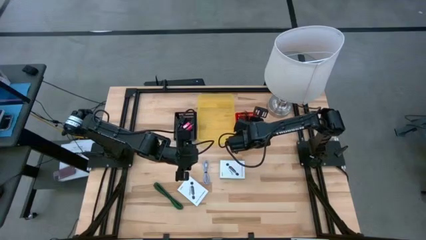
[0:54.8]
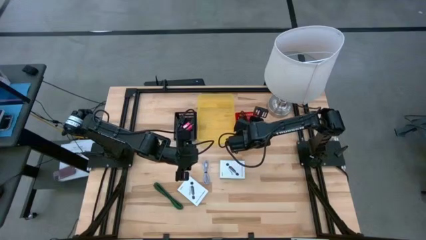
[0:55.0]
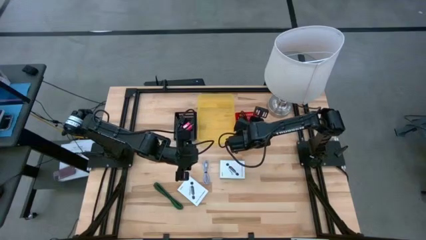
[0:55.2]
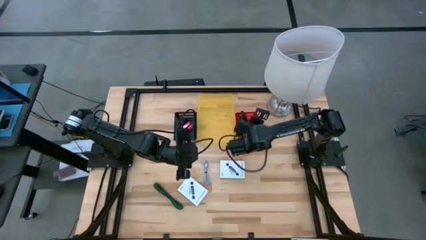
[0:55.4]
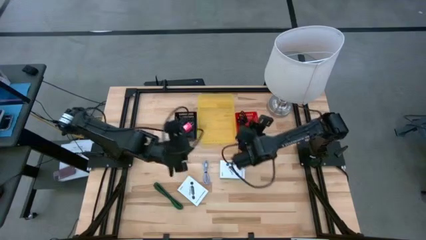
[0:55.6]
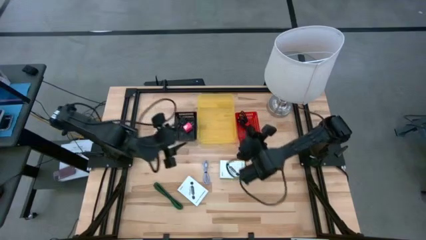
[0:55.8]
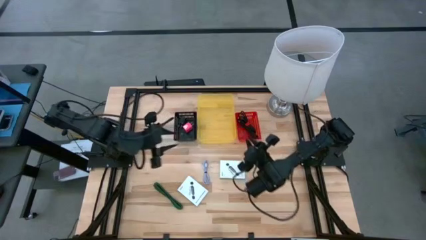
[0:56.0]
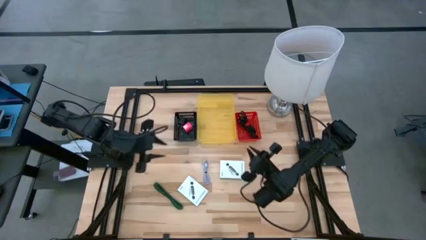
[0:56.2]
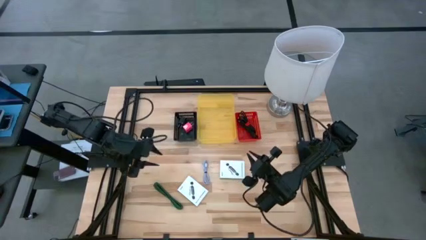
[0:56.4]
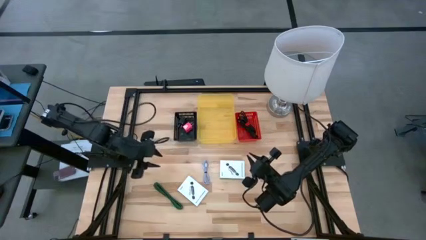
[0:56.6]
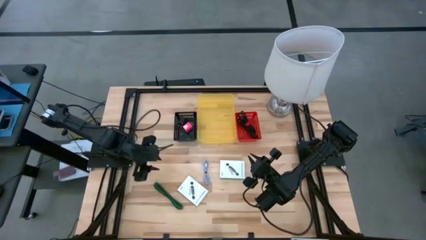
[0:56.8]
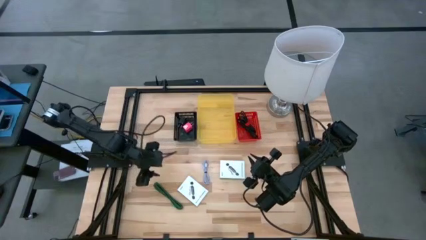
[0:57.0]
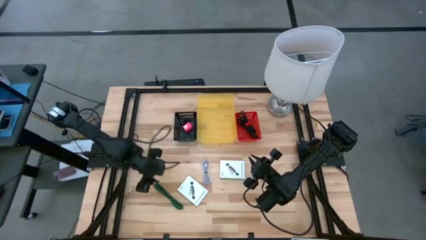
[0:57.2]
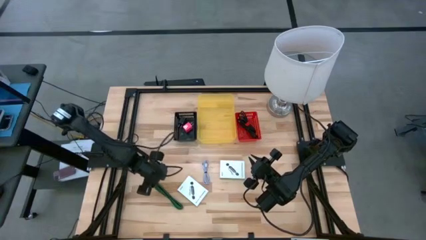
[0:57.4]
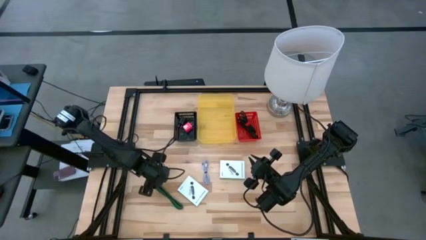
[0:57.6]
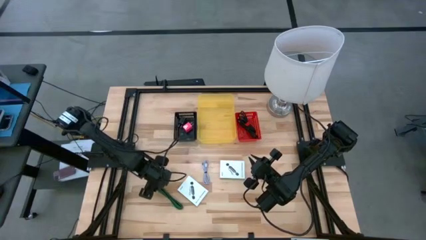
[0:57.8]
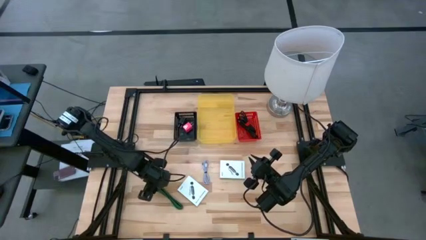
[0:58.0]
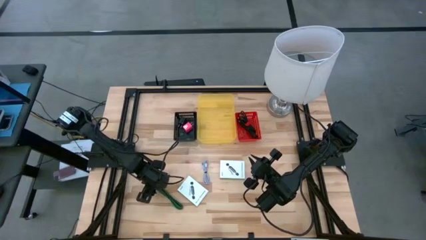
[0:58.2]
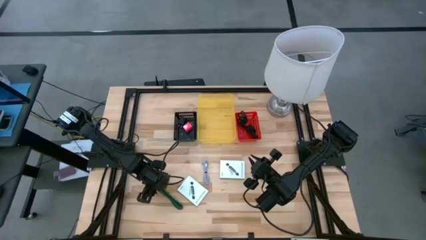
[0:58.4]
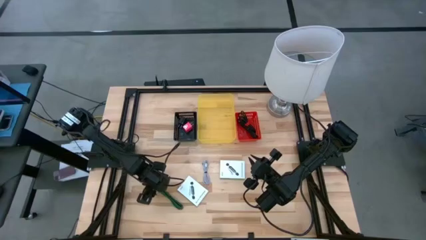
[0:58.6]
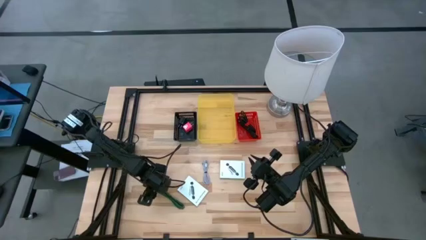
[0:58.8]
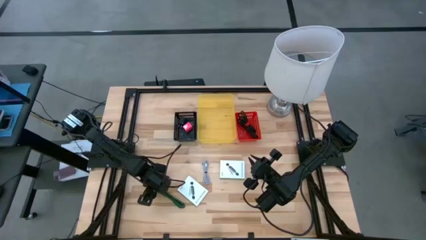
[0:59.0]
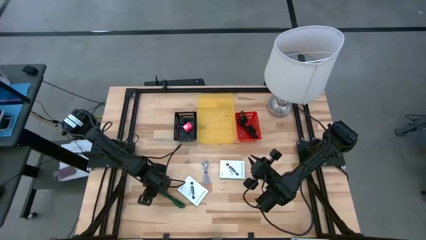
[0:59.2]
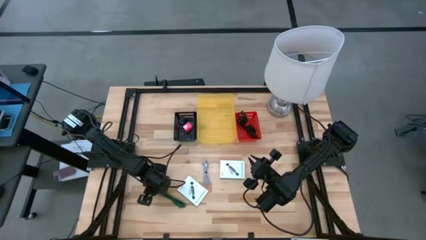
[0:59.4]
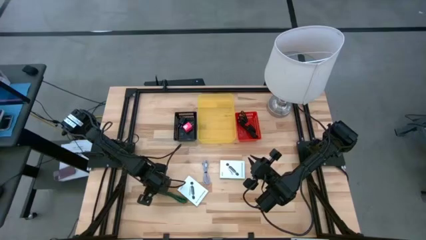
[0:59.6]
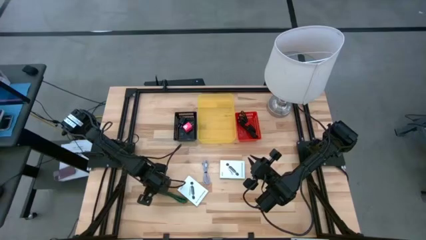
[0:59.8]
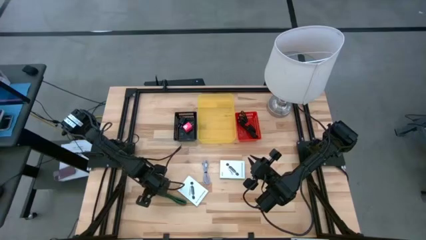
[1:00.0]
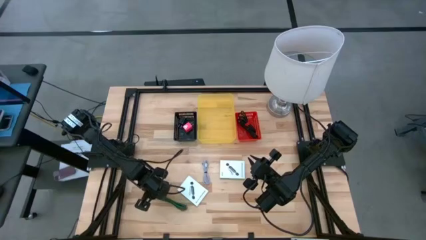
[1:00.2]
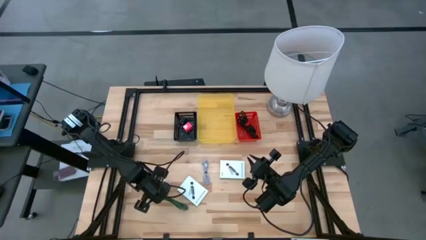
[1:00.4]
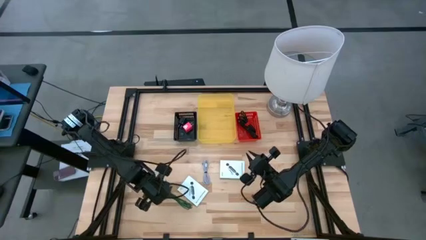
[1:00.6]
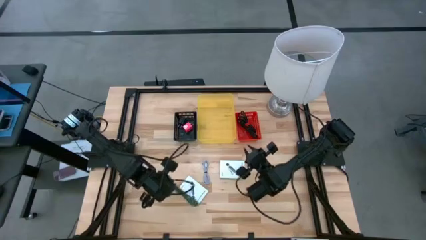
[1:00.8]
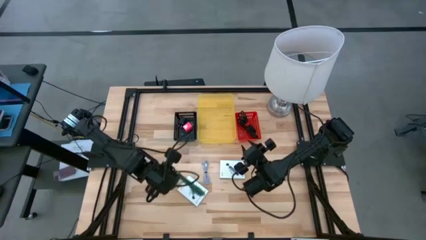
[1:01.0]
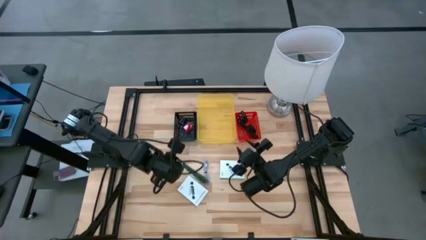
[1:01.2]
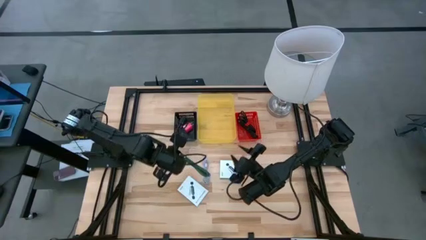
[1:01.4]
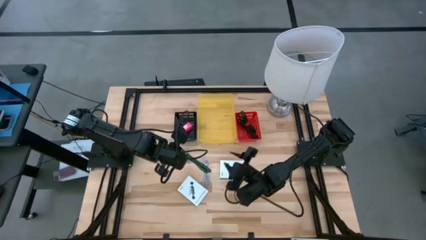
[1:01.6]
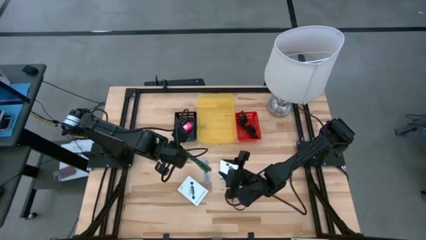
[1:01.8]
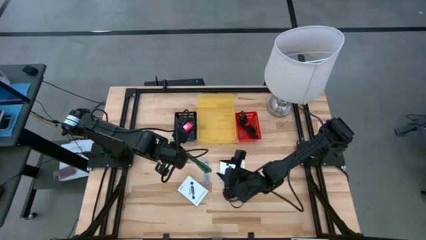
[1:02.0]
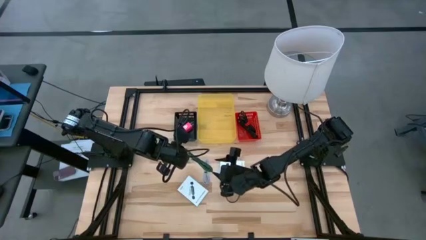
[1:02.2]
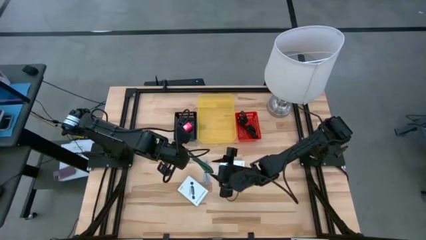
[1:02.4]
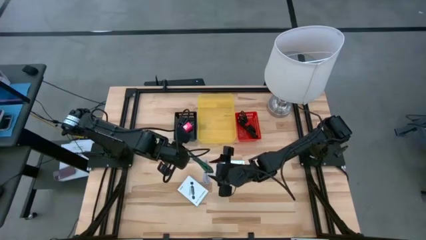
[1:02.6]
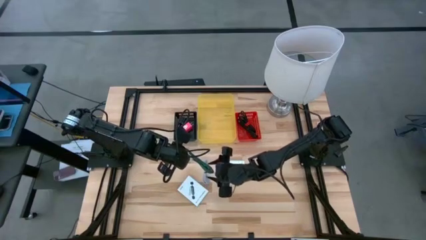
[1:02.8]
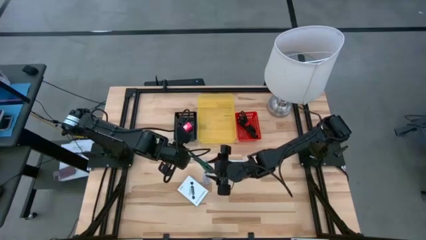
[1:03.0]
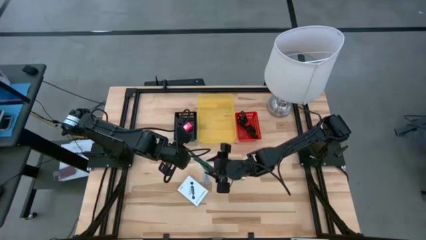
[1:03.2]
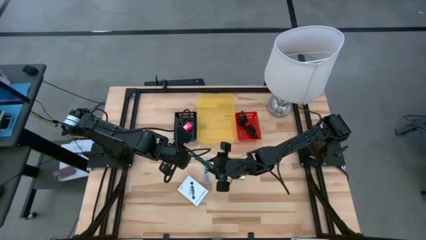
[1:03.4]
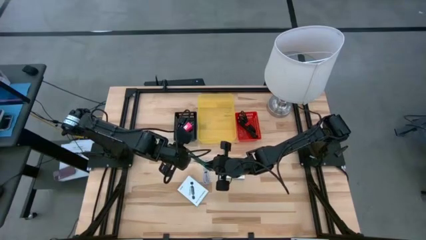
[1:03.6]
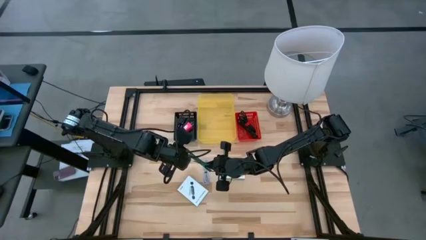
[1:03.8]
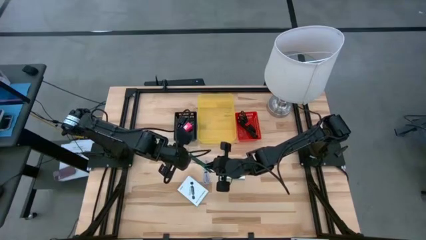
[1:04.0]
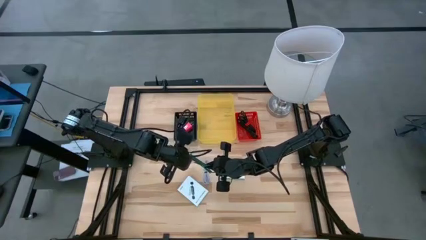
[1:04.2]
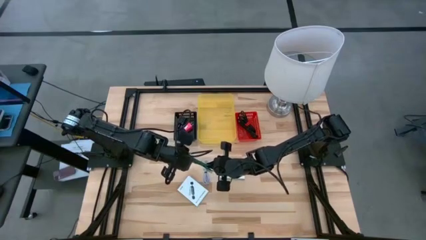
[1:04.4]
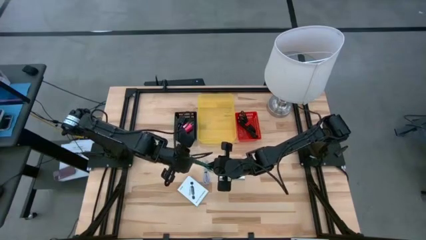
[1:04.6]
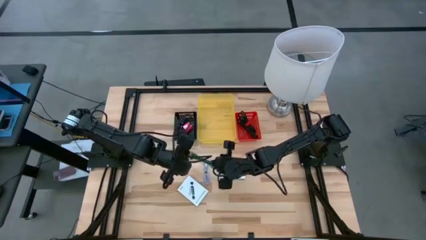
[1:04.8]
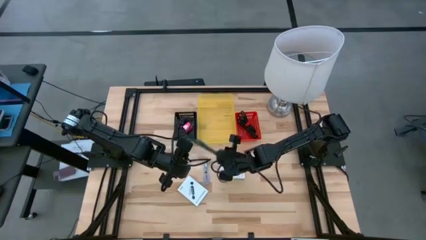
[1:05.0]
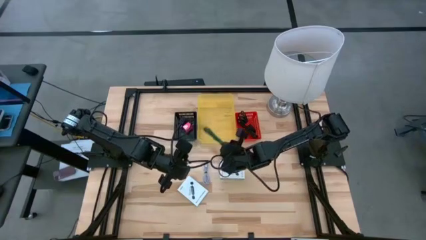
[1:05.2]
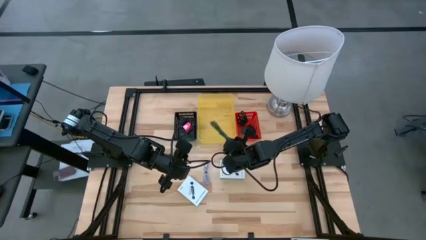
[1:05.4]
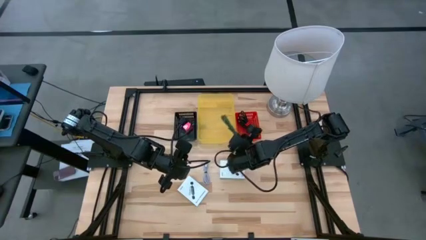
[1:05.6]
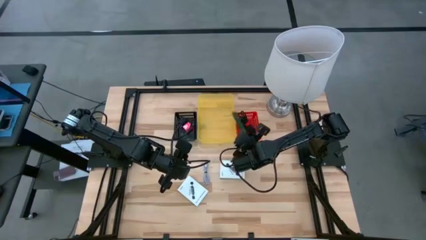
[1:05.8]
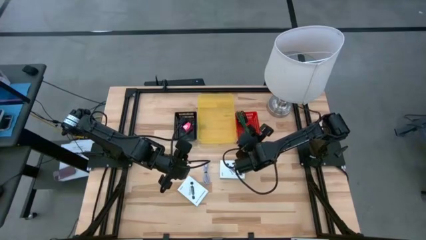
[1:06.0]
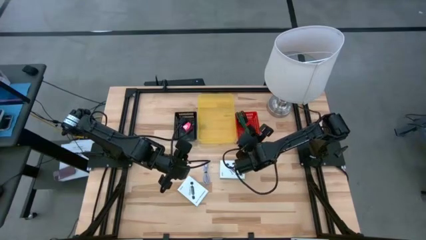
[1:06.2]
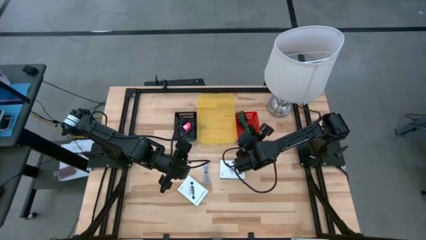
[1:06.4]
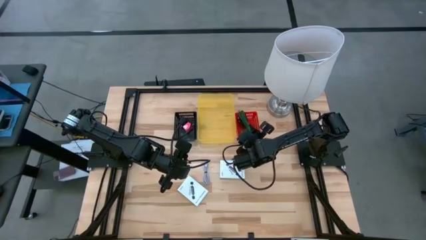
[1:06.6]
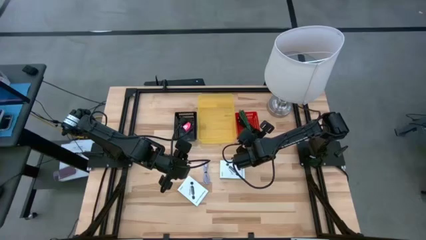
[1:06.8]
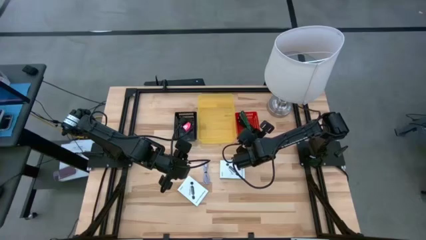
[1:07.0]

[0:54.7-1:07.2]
Task: Pick and place items into bin
Put the green charger cable into the red bin

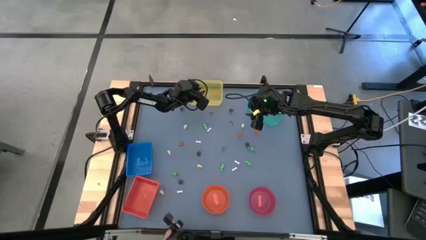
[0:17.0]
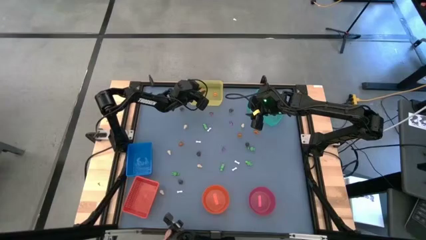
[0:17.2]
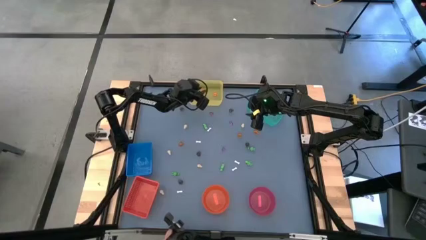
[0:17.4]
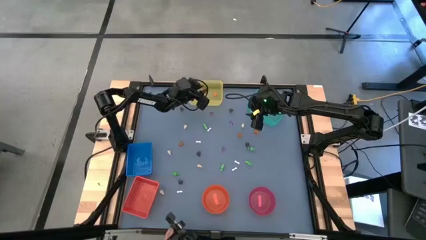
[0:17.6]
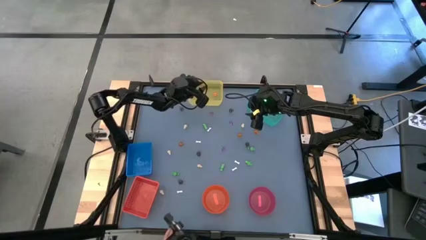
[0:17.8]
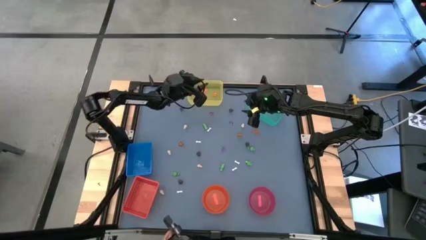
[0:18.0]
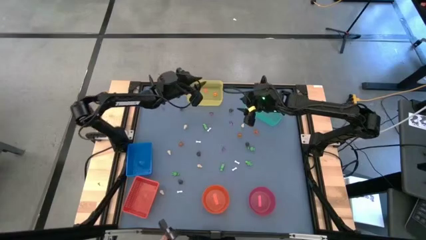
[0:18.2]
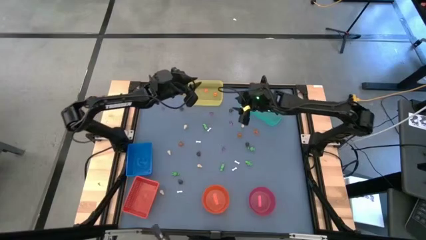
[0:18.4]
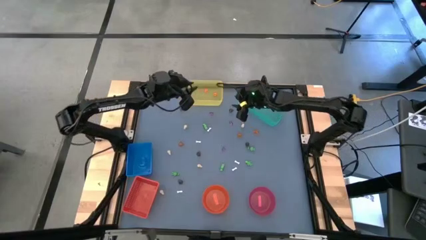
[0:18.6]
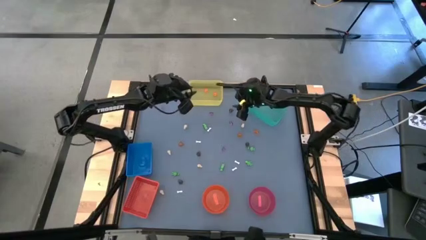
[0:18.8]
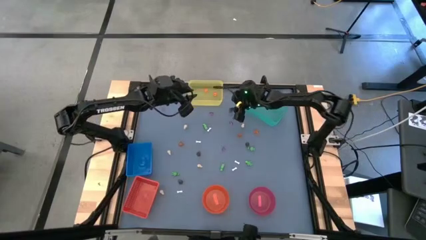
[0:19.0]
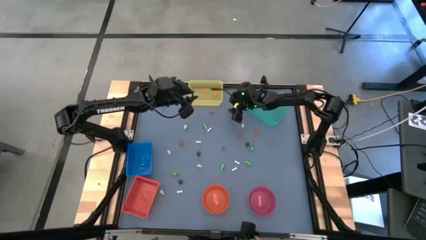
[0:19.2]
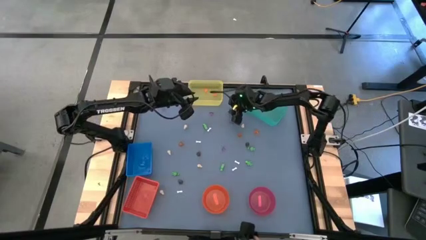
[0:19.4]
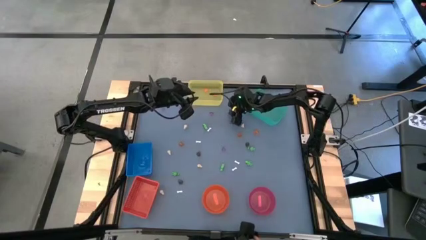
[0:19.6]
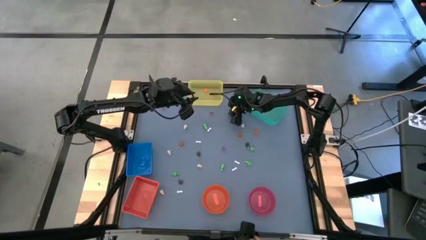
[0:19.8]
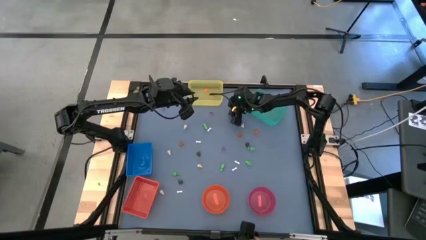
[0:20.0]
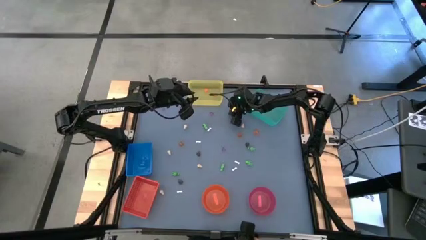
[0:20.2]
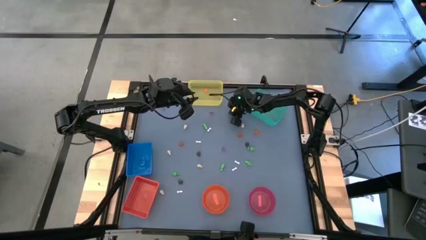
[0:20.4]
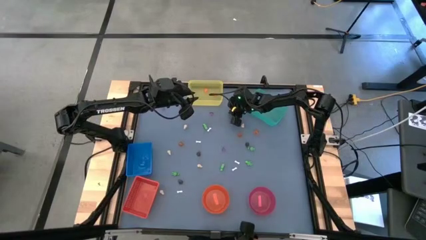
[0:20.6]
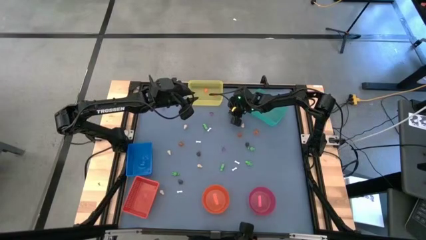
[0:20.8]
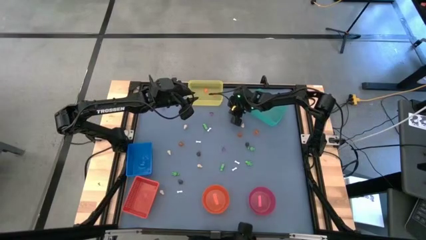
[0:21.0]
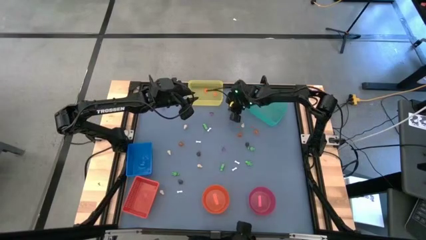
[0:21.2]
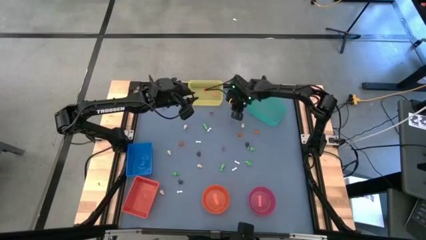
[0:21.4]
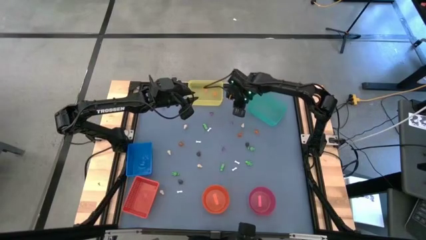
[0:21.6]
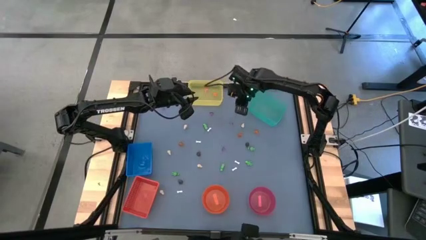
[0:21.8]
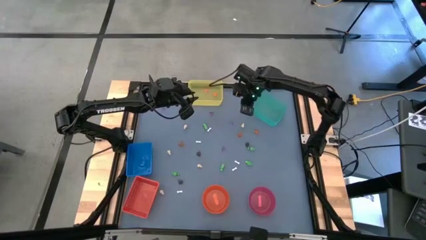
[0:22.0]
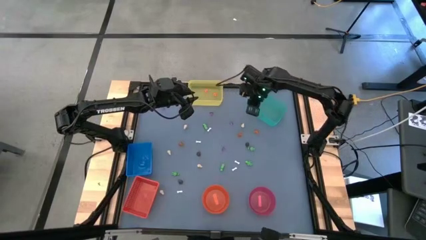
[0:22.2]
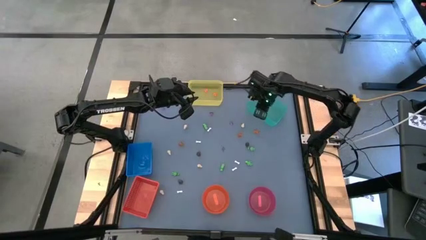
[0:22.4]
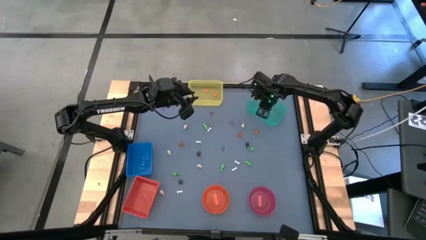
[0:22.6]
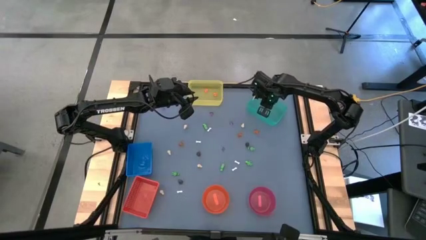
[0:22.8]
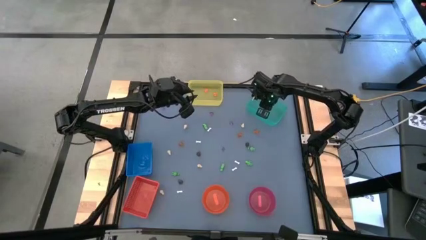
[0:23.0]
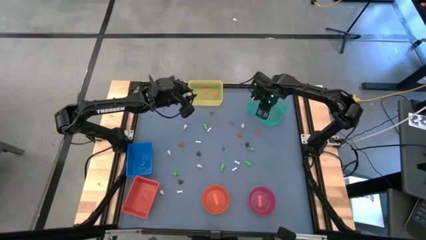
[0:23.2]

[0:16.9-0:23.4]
Task: Sort Halloween decoration
Put the black skull toy into the light blue bin
